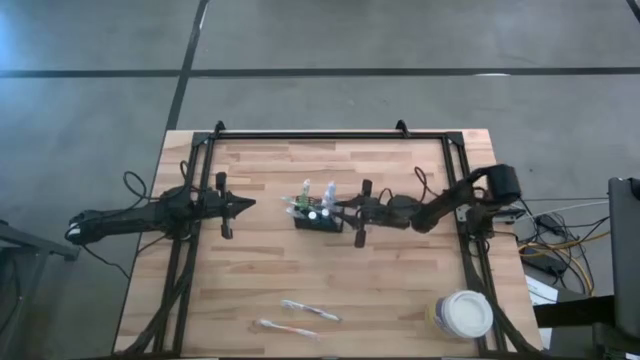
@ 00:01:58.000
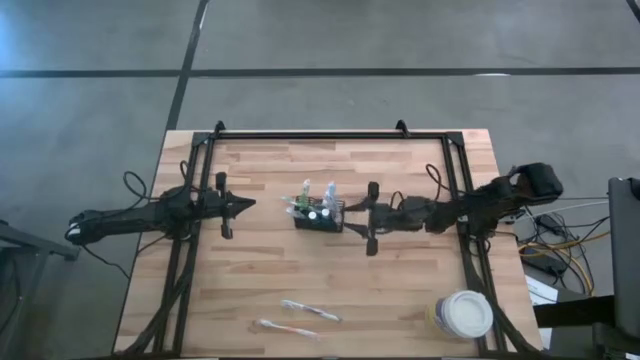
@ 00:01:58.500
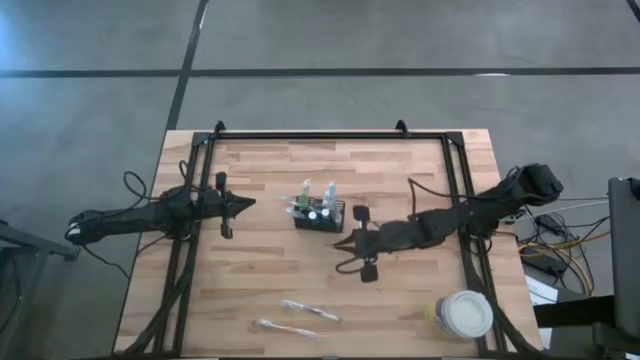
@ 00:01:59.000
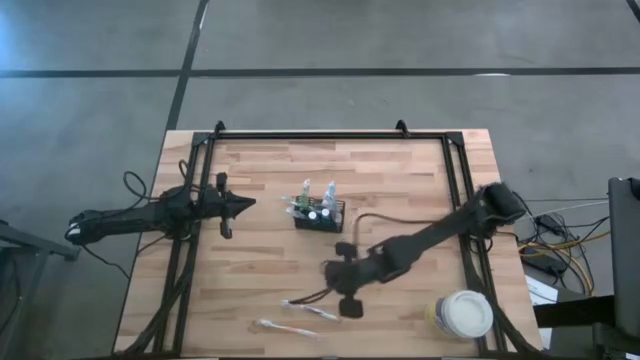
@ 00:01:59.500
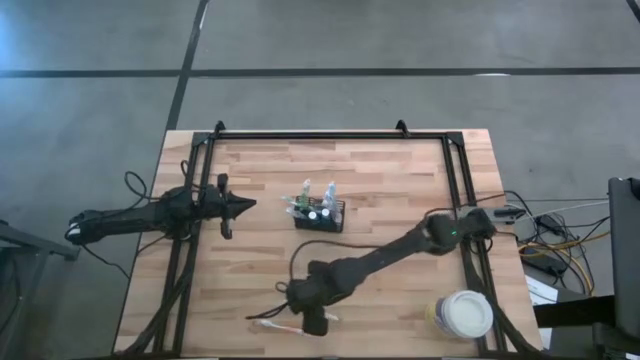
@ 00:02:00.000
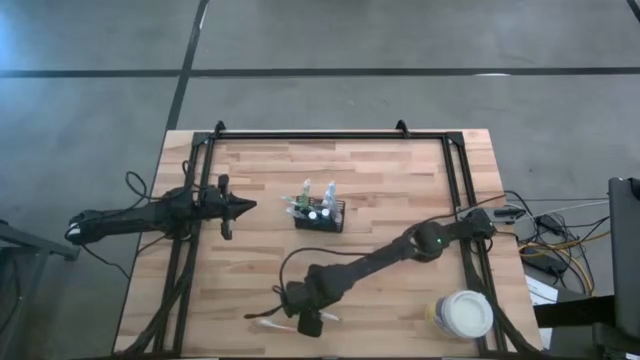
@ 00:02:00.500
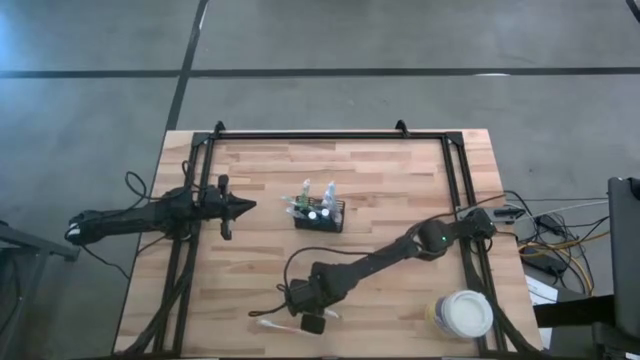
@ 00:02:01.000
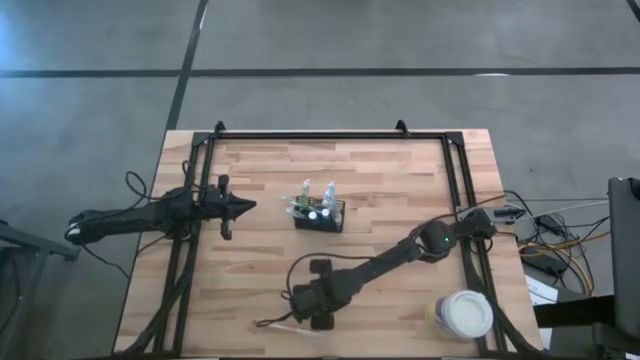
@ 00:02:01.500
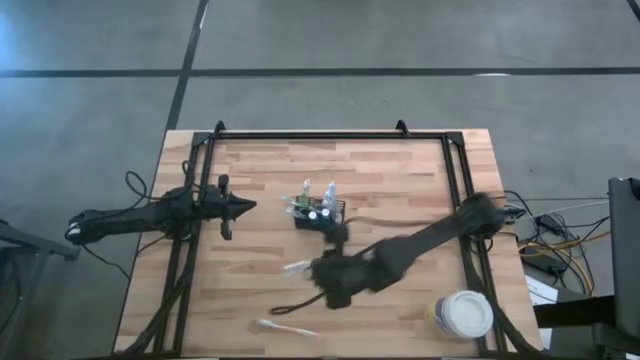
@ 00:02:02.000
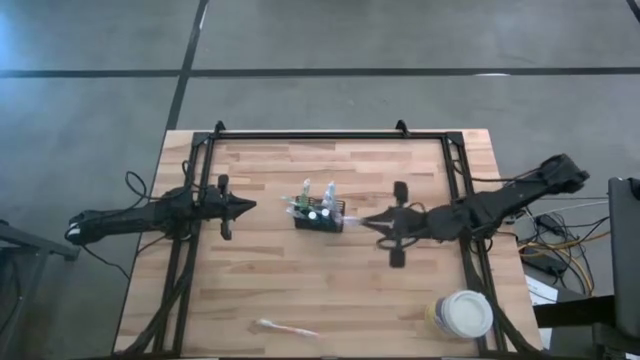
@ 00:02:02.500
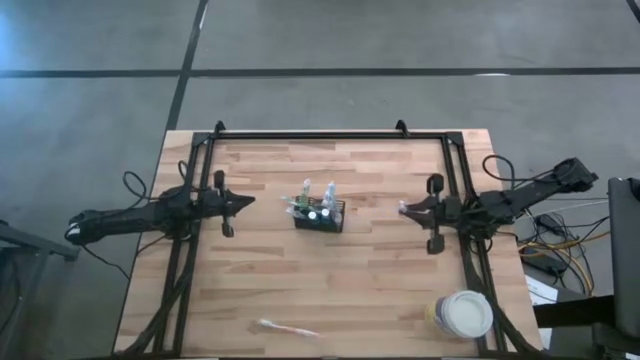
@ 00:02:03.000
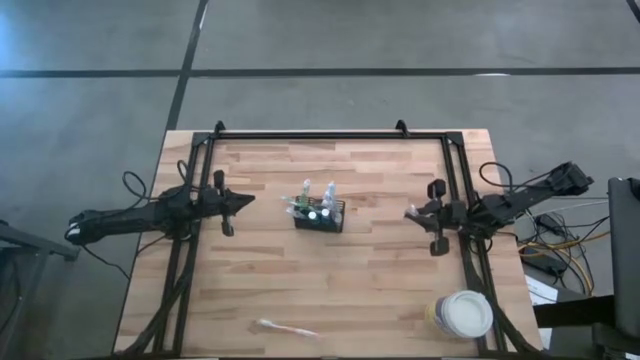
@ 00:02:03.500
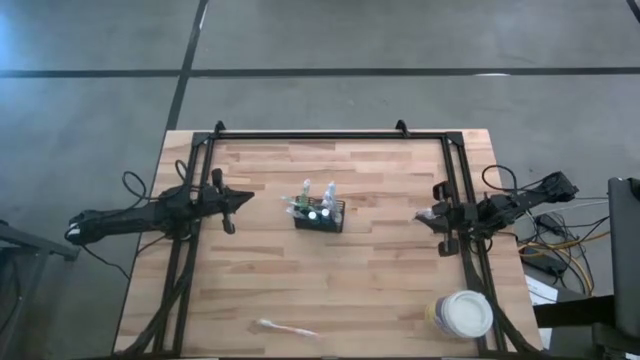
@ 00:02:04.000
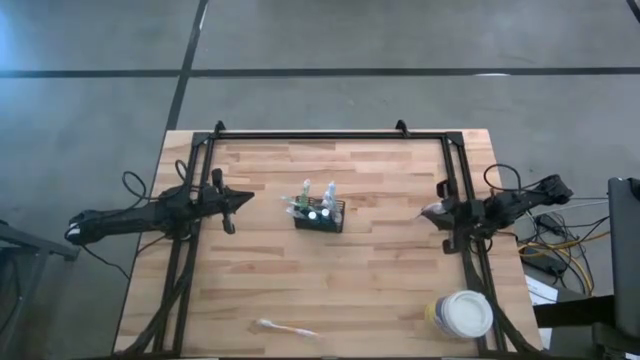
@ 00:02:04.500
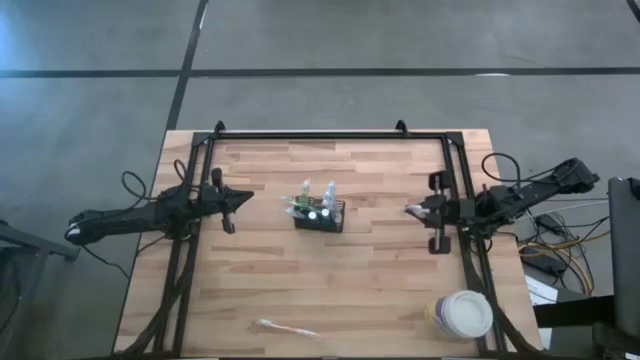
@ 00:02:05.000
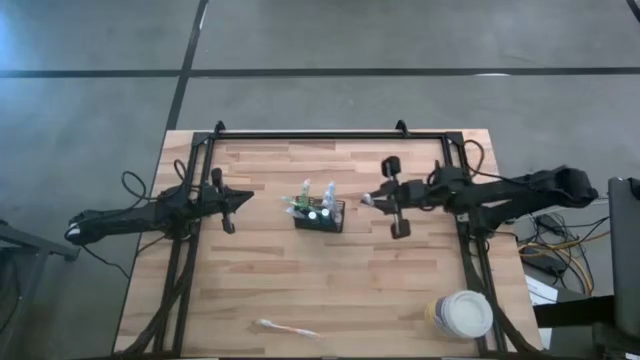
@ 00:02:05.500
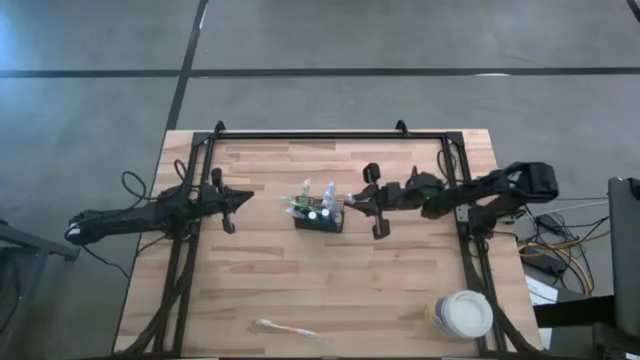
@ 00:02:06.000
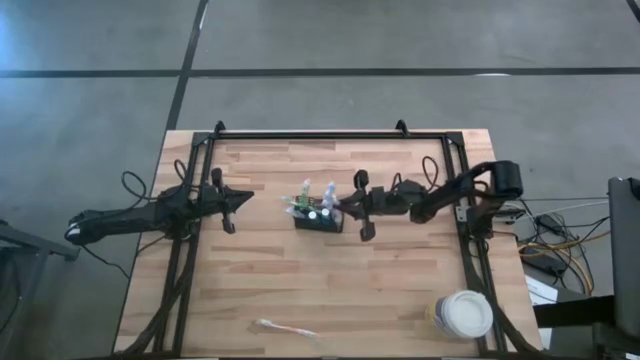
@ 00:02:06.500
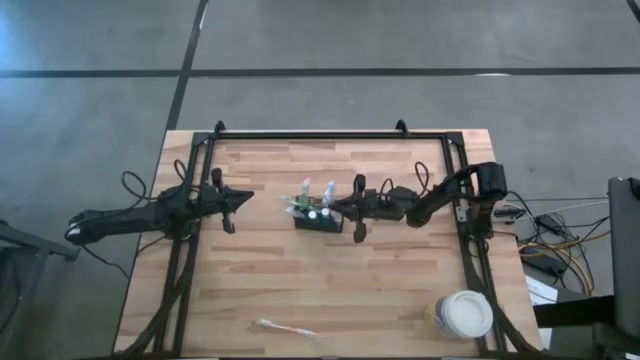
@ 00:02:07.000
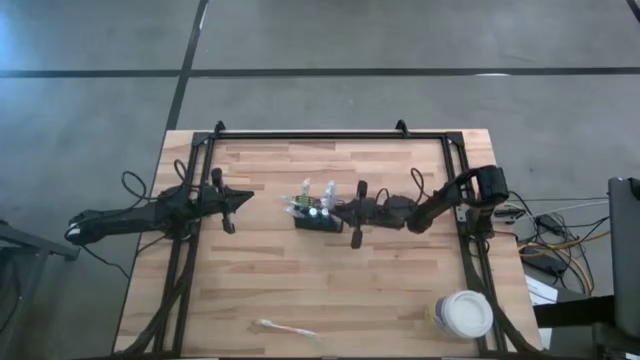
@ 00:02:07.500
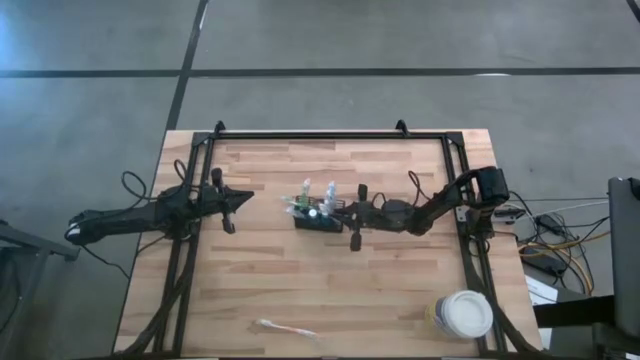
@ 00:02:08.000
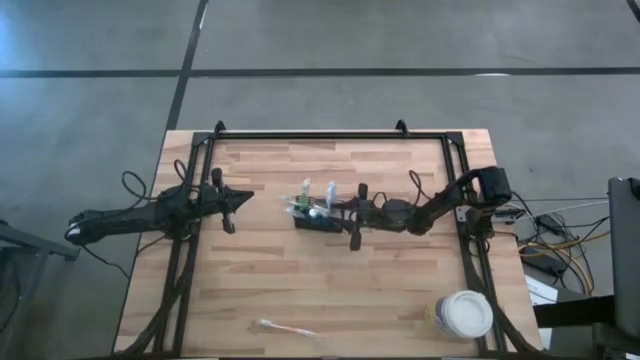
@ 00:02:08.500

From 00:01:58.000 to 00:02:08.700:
Task: Pick & Place toothbrushing station
Put the purple toothbrush into the wire organizer

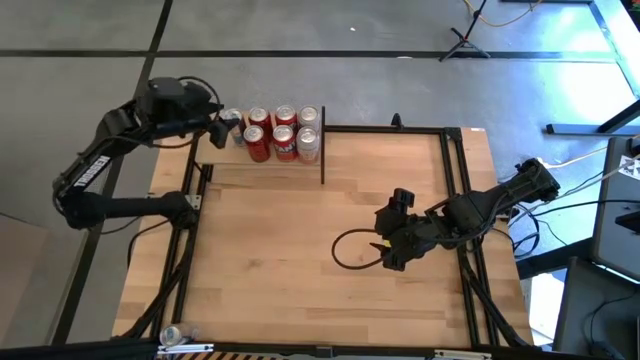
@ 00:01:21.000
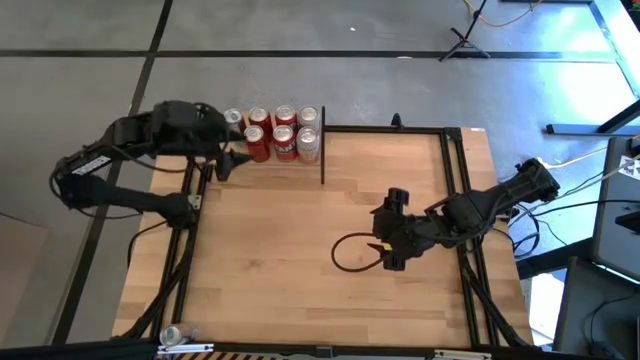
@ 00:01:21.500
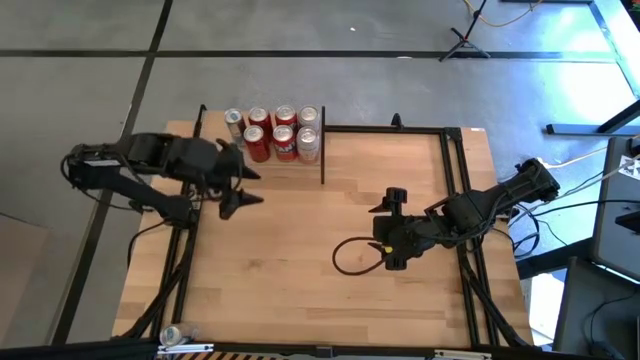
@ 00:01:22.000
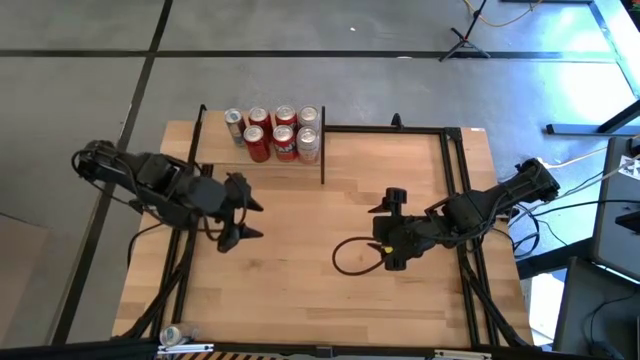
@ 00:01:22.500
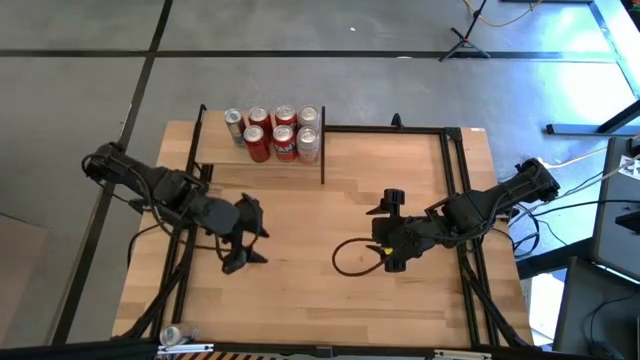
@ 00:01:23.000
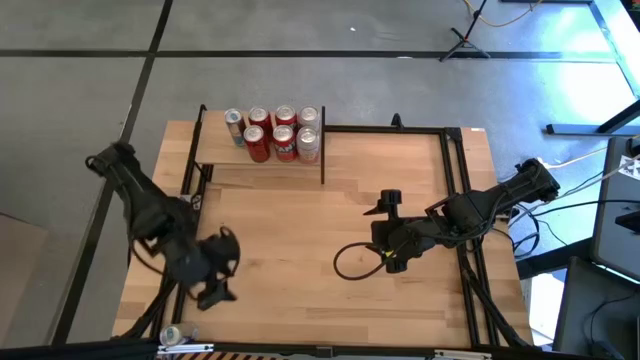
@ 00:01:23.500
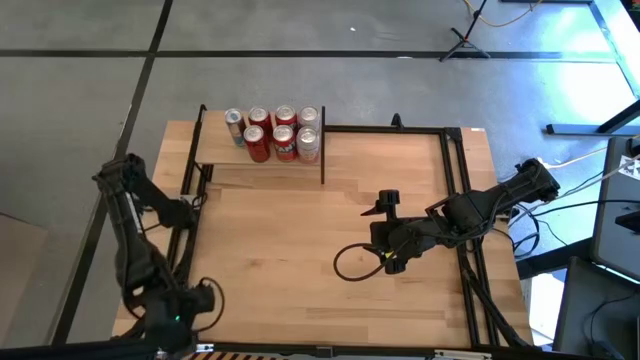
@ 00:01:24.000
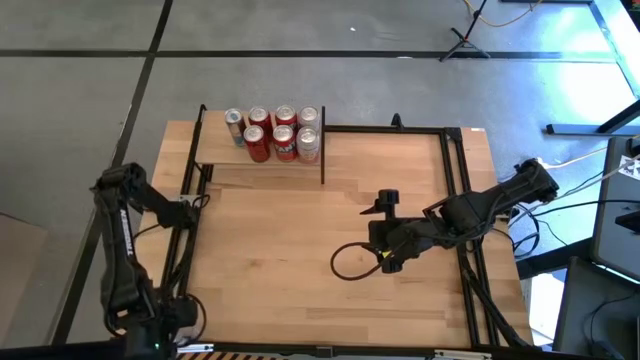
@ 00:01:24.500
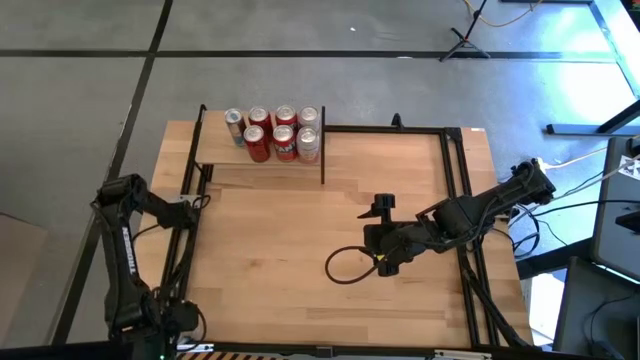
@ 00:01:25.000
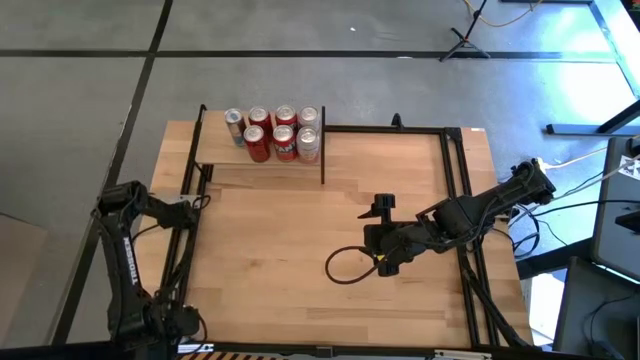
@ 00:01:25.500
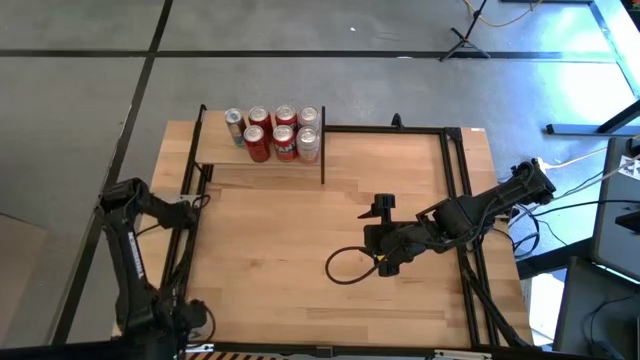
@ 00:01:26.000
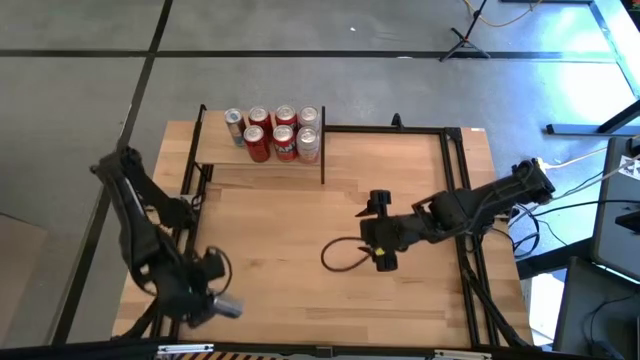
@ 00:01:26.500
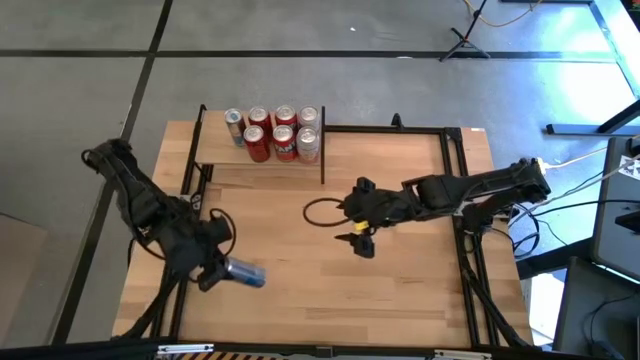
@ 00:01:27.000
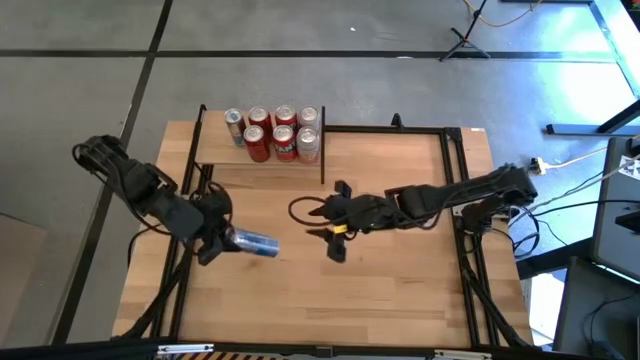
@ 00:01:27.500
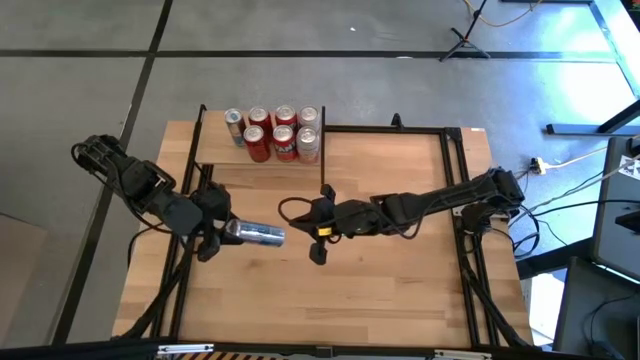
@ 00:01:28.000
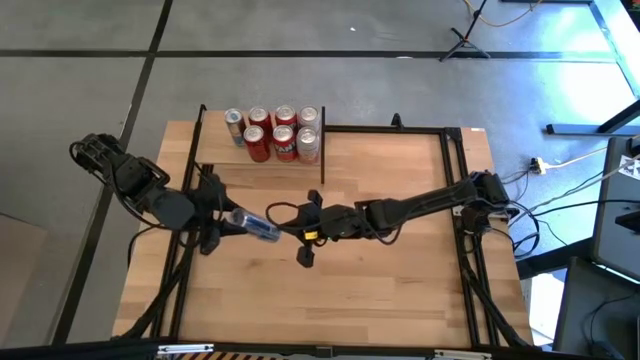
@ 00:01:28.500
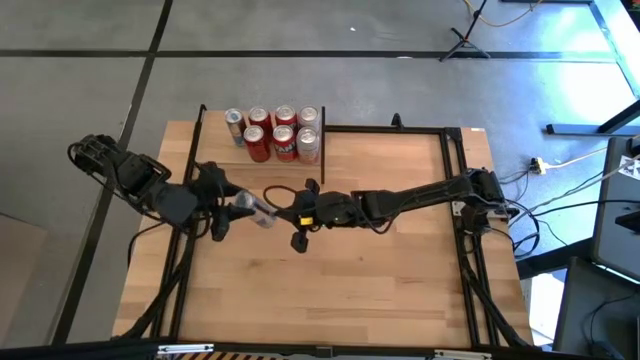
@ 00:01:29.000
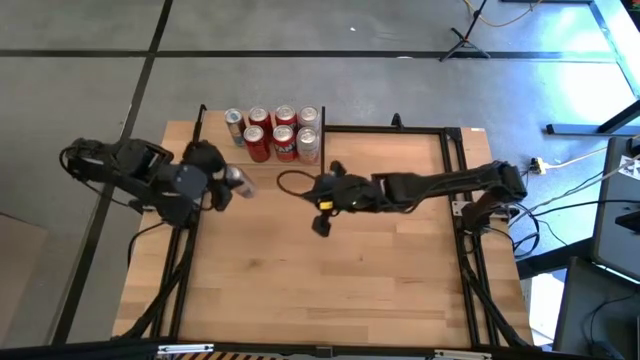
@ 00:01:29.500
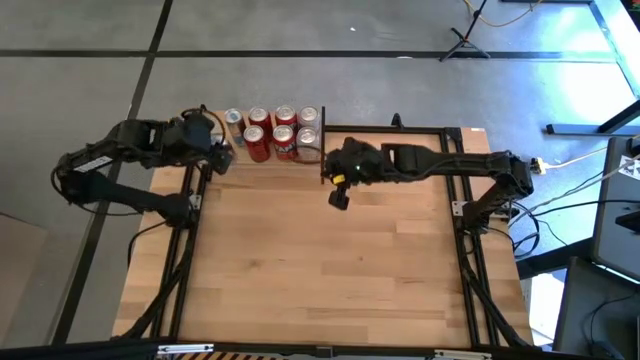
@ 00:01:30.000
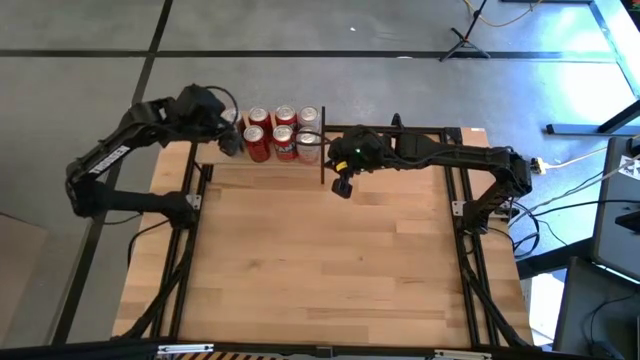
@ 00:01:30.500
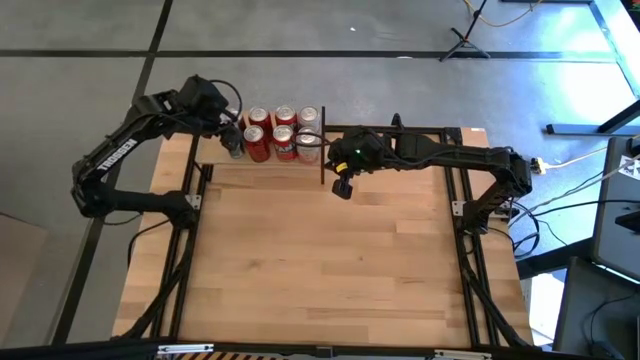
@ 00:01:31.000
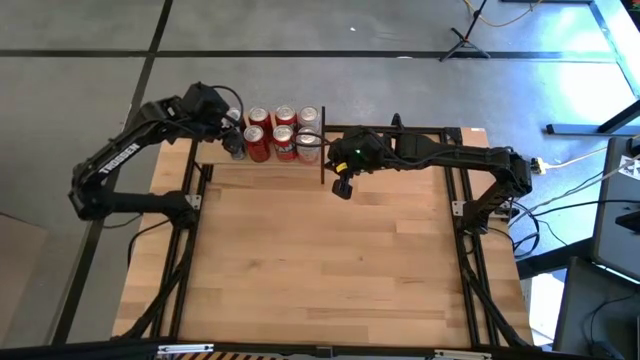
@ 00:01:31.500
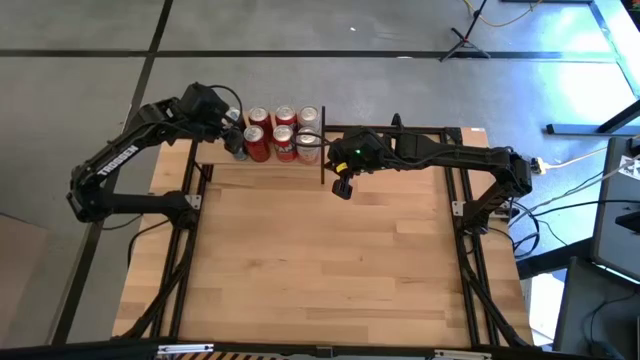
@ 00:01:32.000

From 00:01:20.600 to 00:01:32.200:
Task: Place canned beverage on shelf
Put the blue soda can on the shelf aligned with the other blue soda can
